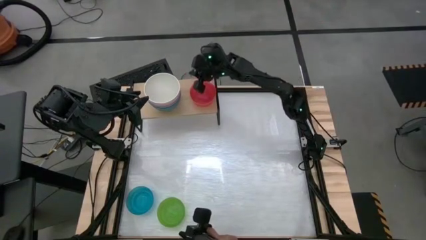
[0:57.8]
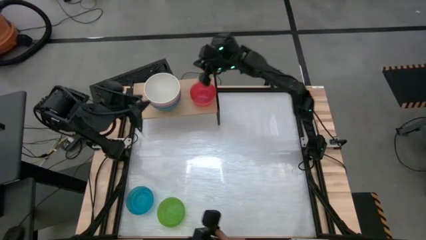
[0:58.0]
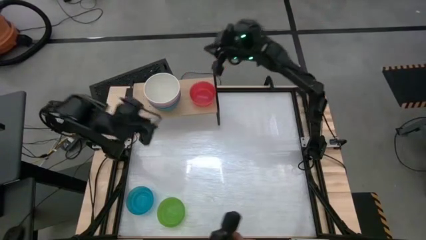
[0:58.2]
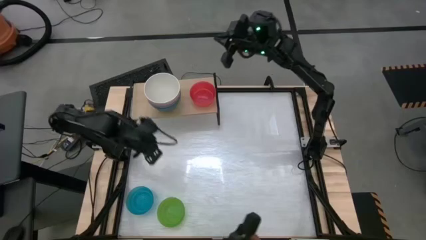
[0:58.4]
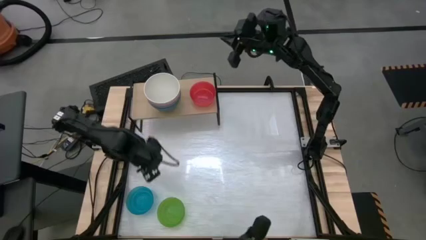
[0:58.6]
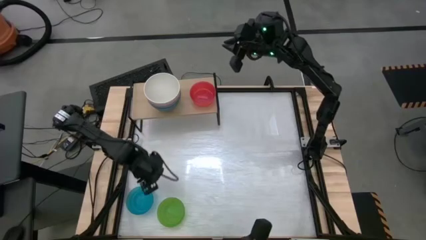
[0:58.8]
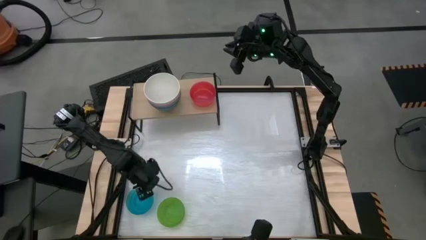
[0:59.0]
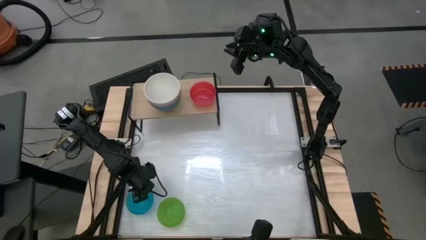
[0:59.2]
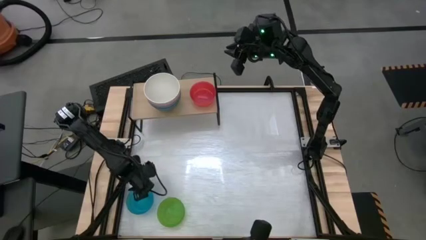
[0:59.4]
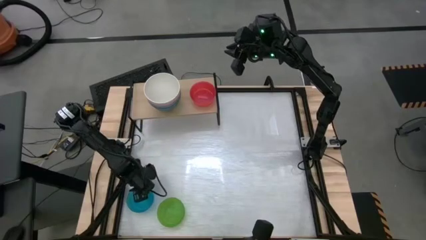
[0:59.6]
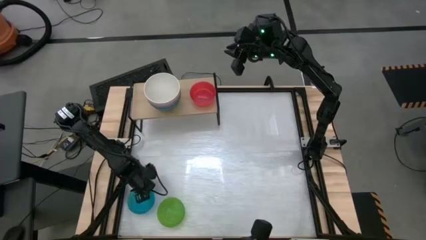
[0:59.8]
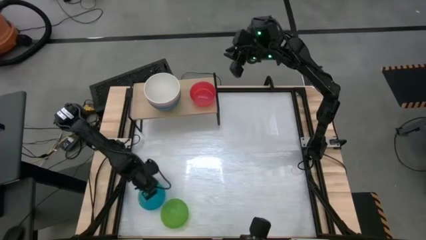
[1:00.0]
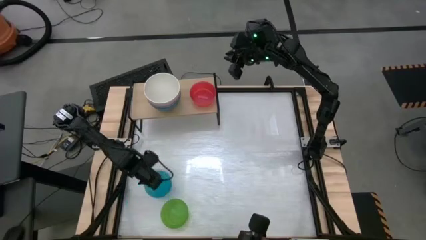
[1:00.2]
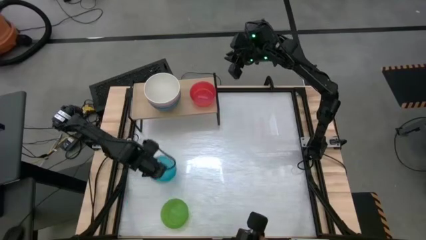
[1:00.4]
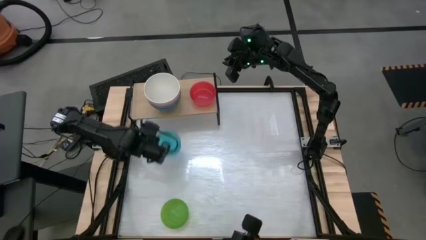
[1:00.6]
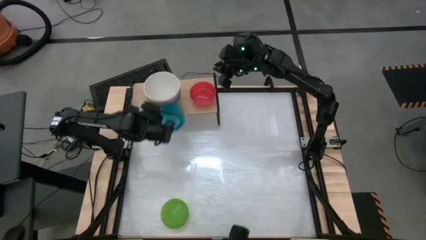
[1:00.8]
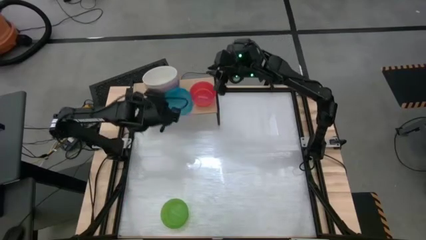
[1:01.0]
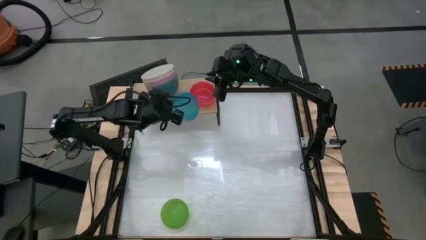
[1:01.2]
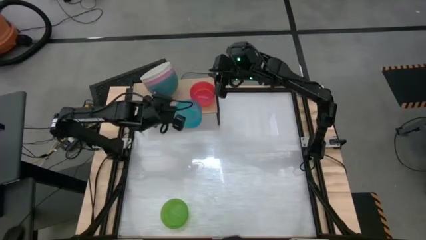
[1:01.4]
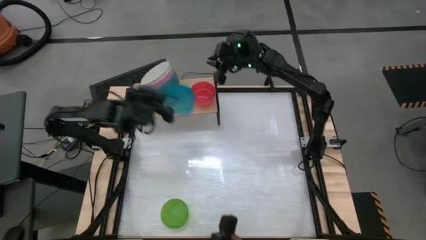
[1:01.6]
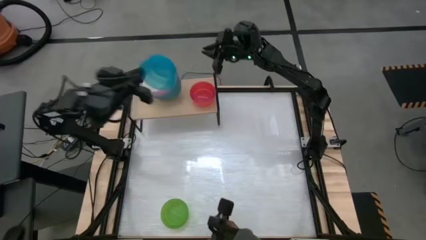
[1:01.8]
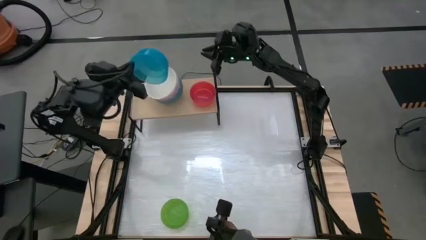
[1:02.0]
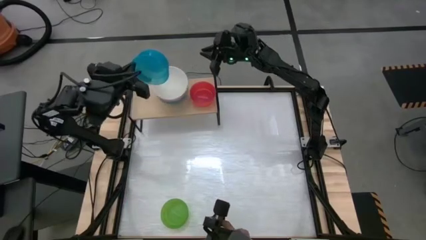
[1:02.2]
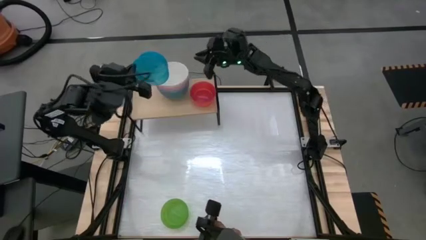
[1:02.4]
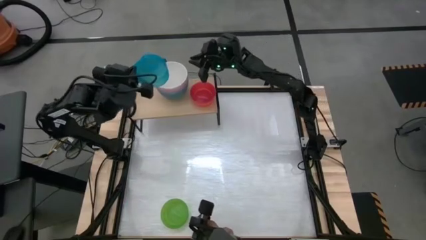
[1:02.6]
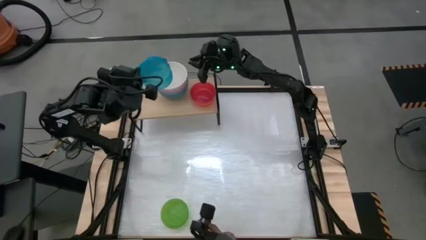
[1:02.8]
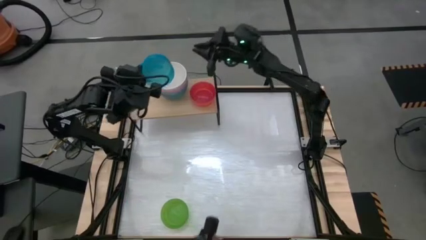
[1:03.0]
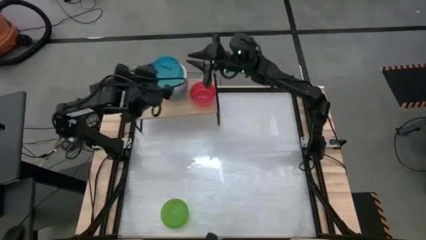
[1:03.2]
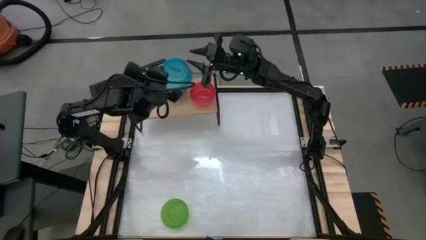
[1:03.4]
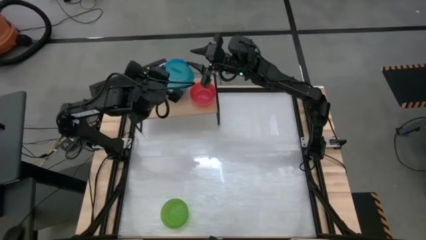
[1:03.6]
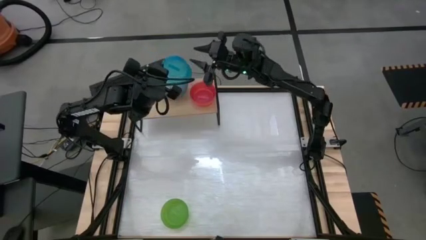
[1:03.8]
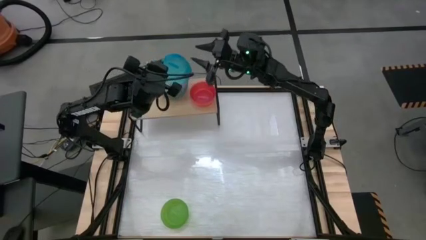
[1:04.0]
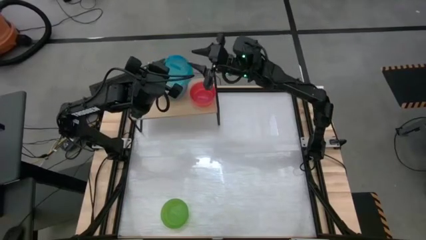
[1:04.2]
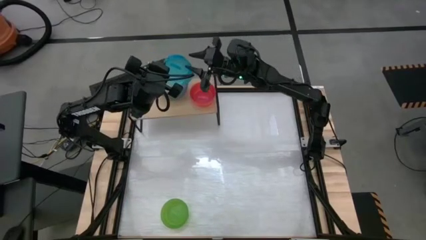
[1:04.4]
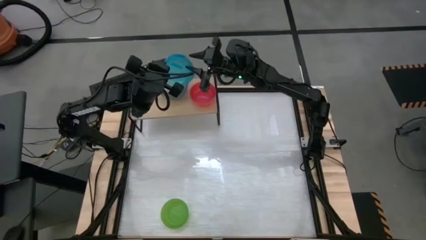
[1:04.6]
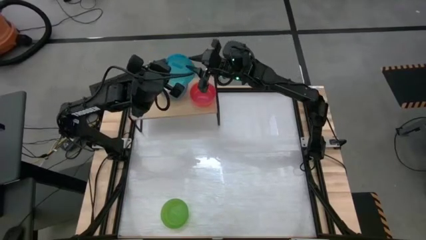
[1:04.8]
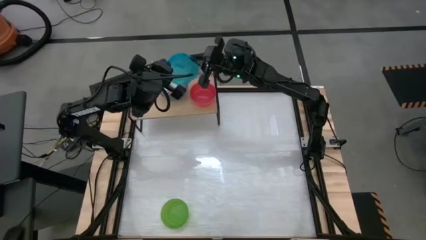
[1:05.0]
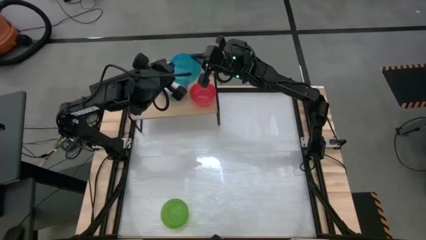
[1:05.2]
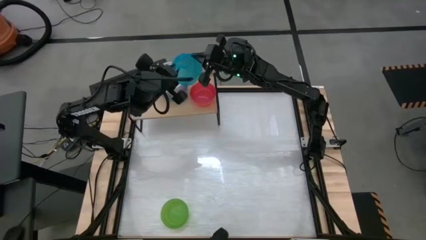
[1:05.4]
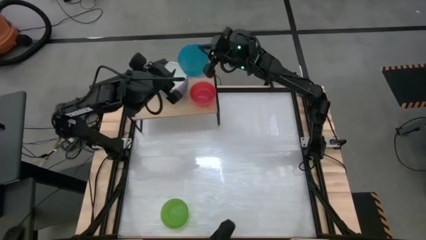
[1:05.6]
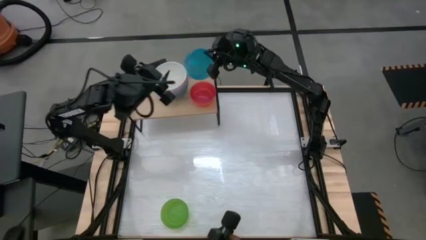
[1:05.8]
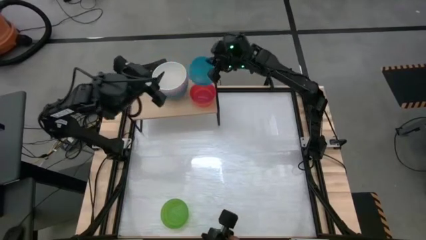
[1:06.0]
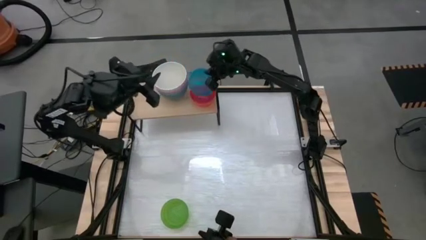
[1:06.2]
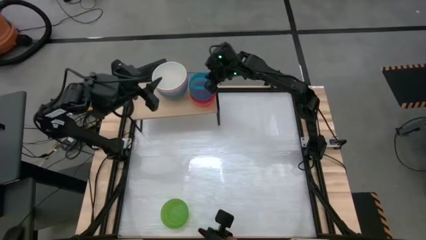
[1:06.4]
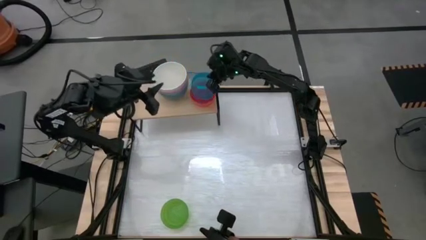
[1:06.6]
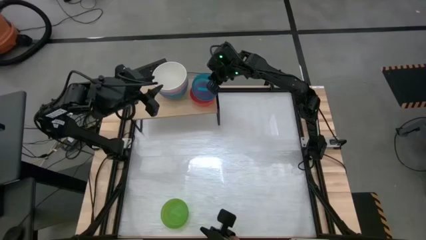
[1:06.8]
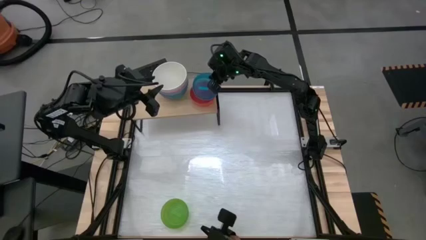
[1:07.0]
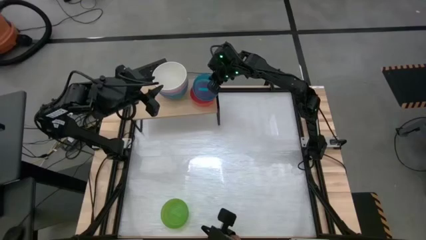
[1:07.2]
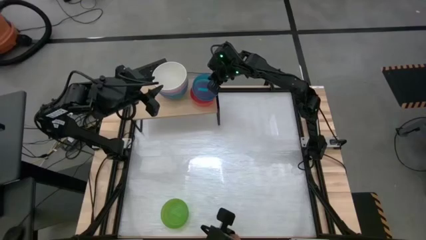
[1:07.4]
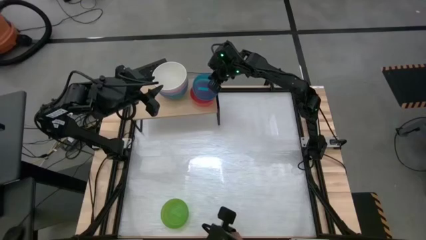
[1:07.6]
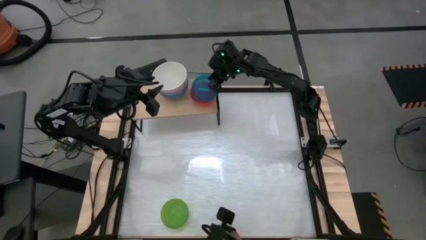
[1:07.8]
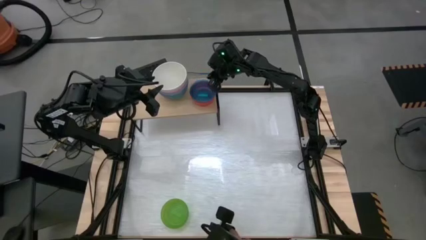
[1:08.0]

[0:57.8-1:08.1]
Task: Place and stack bowls onto a shelf
Stack the small blue bowl on top of the small pink bowl on the shelf

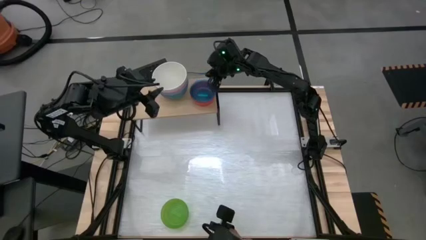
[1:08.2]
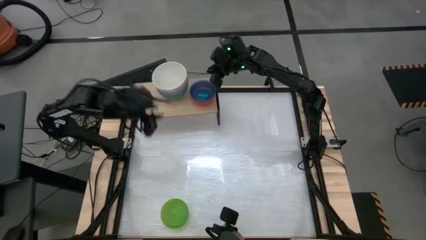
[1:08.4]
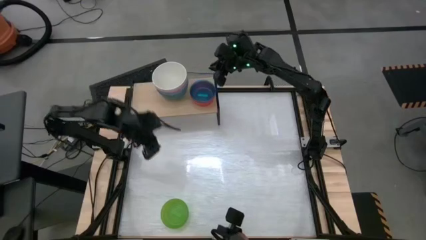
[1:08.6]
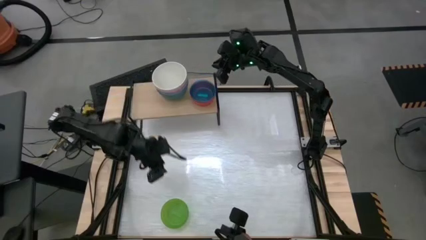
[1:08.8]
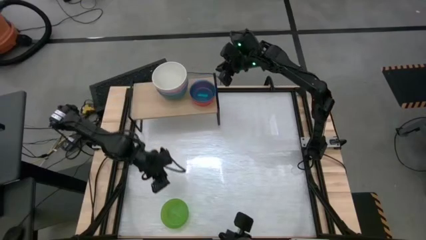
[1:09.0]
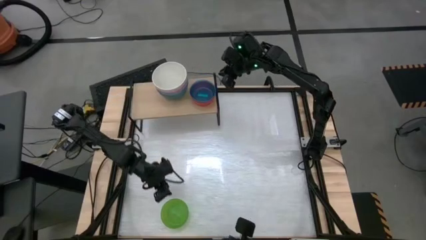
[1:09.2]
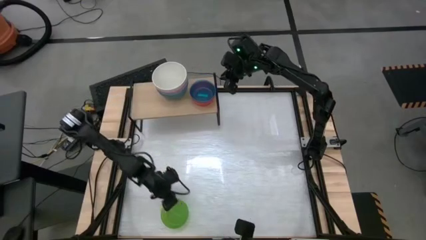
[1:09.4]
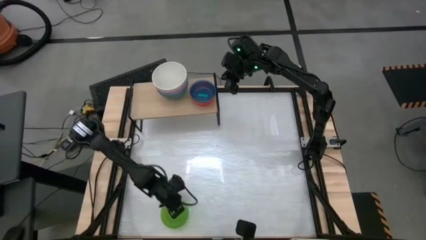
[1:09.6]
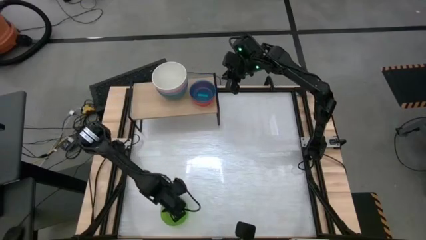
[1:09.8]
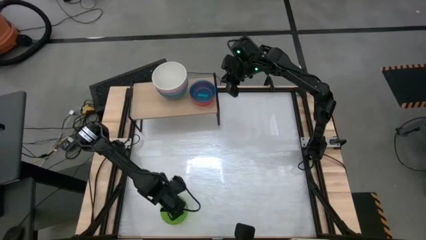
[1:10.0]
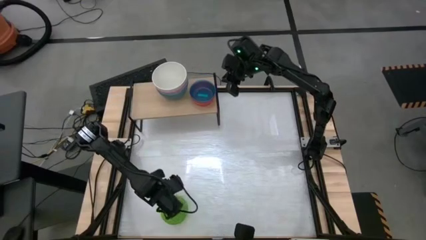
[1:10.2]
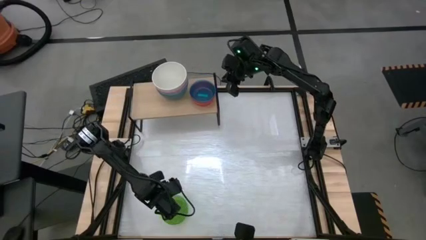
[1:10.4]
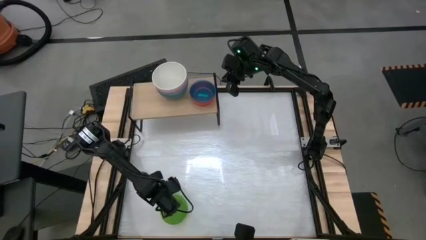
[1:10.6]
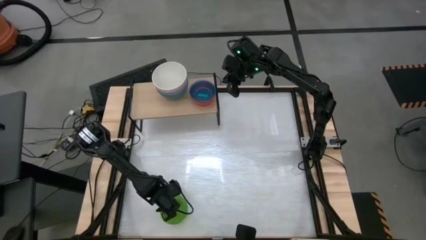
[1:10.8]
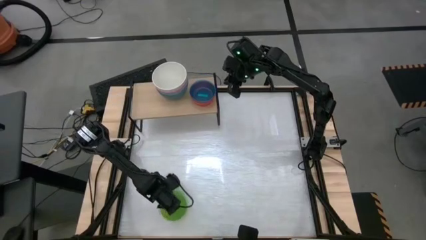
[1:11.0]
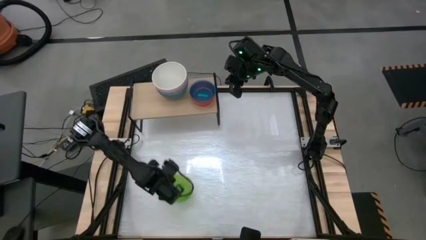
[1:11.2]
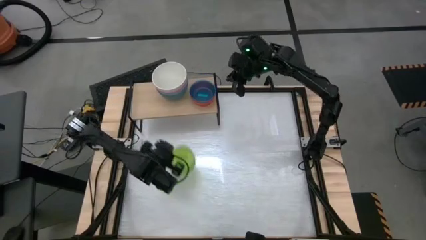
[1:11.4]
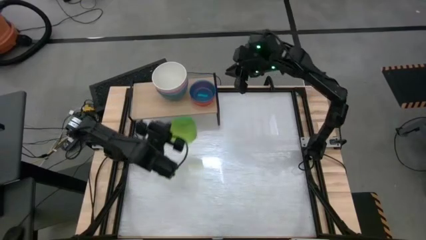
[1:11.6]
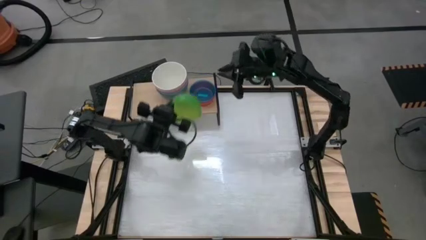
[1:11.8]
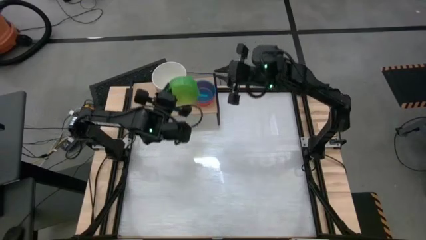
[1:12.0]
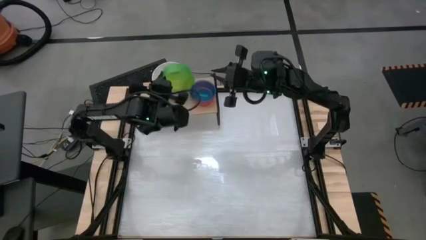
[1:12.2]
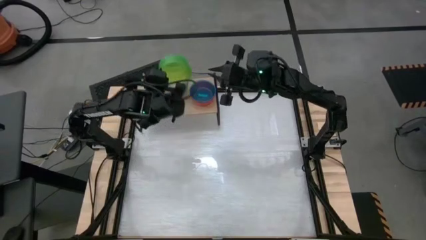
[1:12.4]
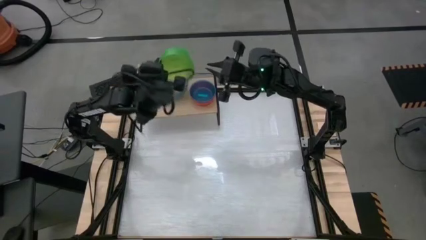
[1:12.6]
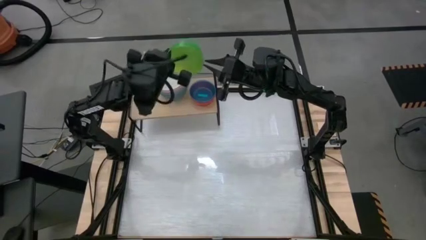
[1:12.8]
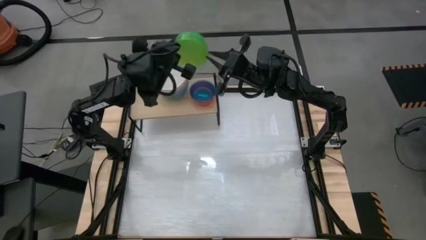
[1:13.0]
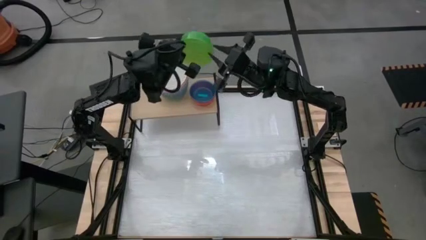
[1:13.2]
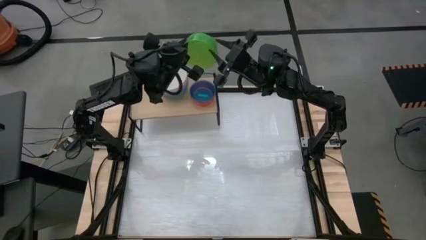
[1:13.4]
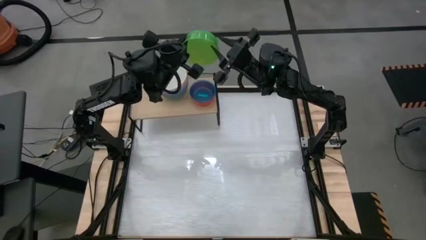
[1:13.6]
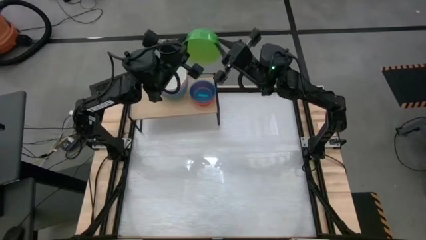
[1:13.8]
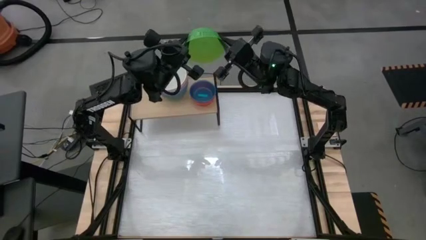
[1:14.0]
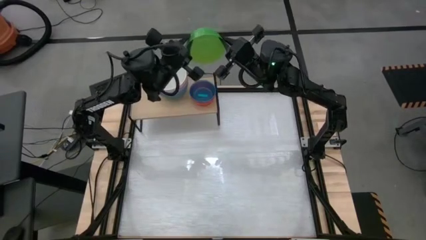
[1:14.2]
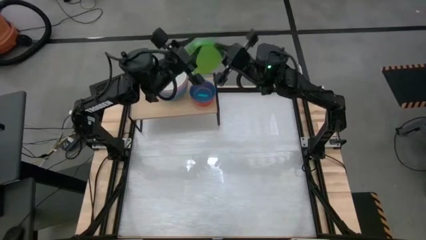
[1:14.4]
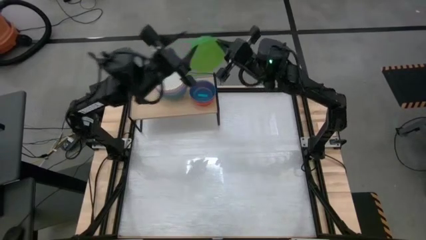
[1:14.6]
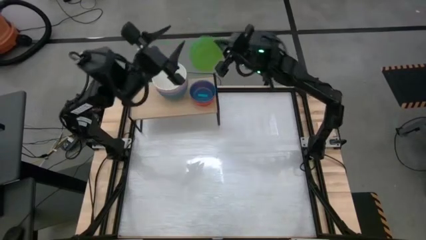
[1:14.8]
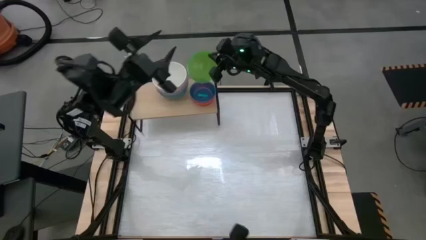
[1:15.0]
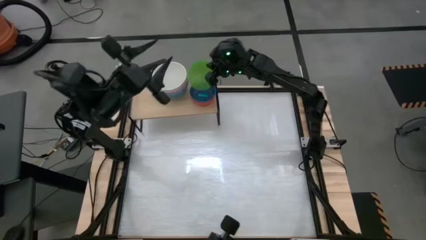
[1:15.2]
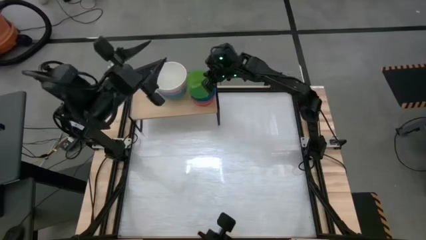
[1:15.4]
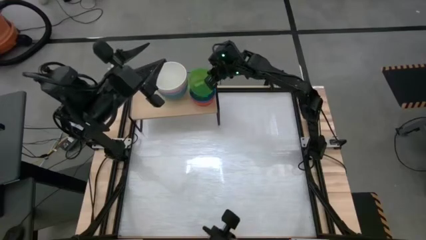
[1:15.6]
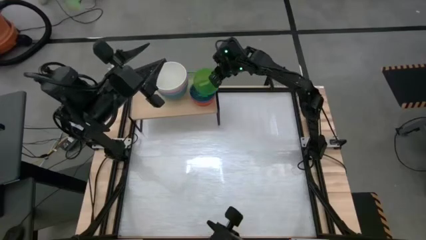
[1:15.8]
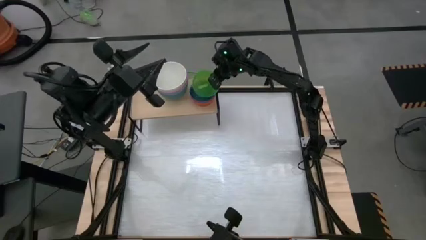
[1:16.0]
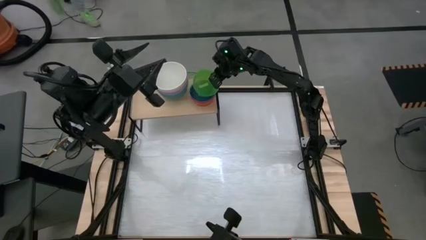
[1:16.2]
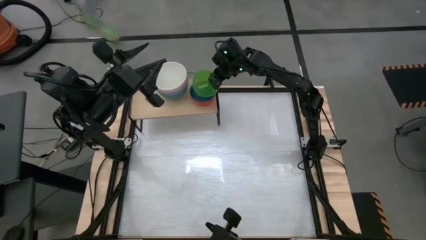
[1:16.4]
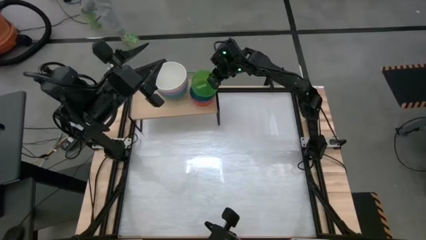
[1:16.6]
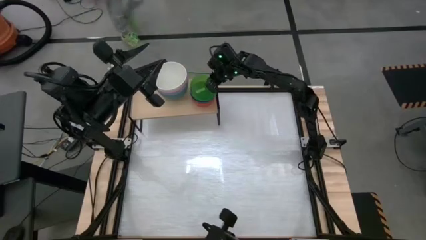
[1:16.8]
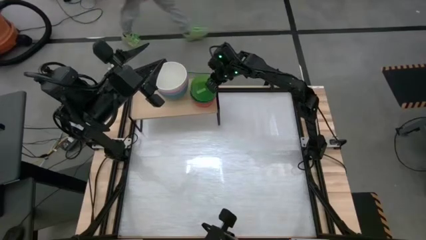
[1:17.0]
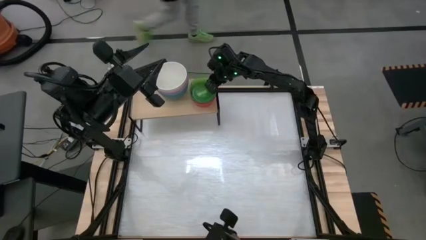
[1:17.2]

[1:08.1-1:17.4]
Stack the small green bowl on top of the small blue bowl on the shelf
